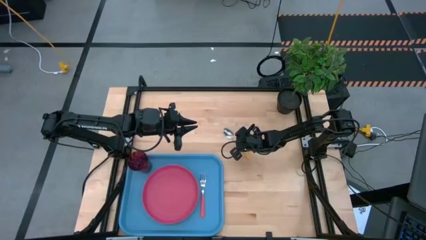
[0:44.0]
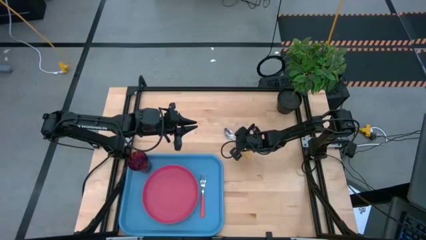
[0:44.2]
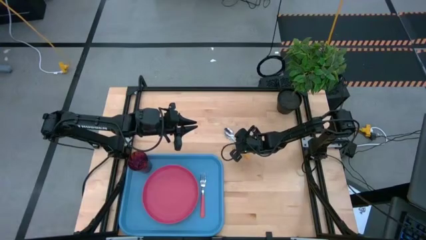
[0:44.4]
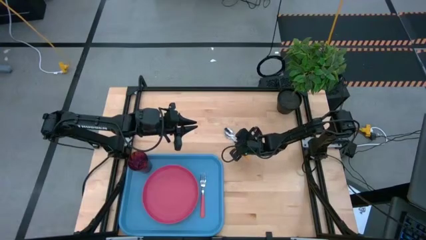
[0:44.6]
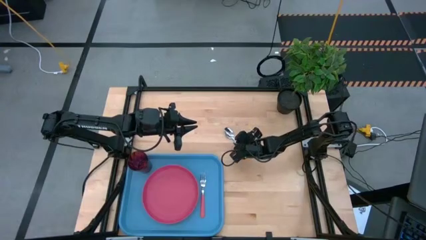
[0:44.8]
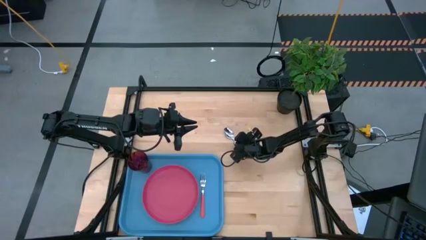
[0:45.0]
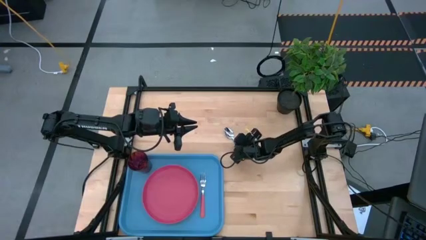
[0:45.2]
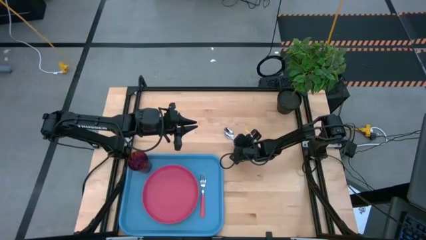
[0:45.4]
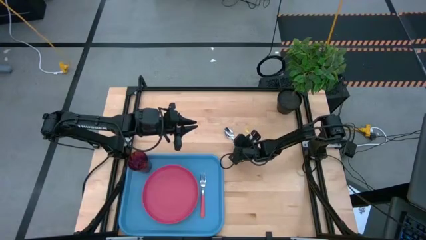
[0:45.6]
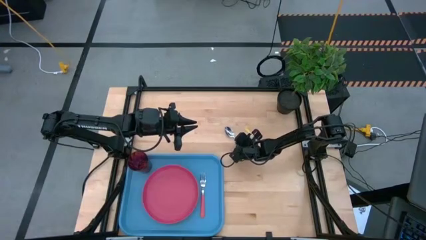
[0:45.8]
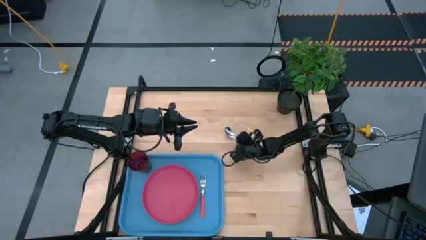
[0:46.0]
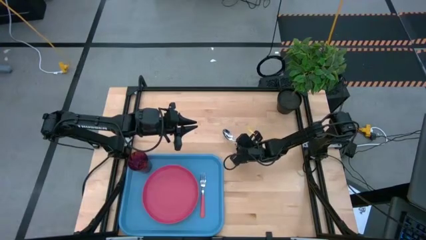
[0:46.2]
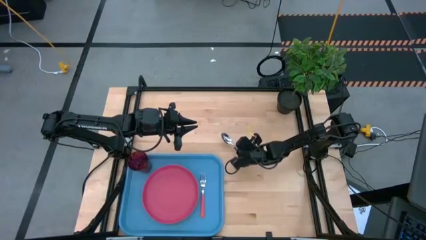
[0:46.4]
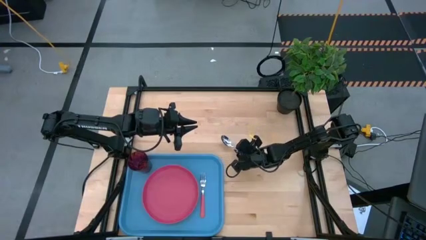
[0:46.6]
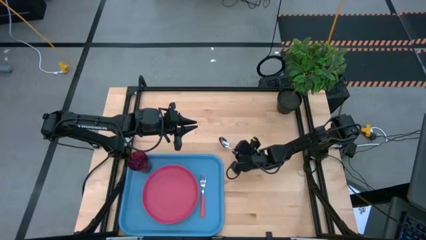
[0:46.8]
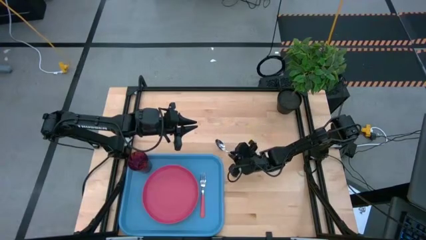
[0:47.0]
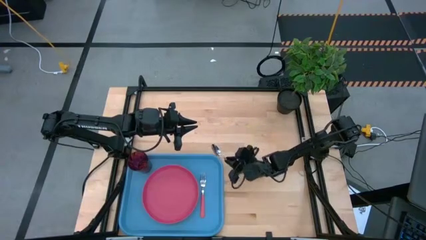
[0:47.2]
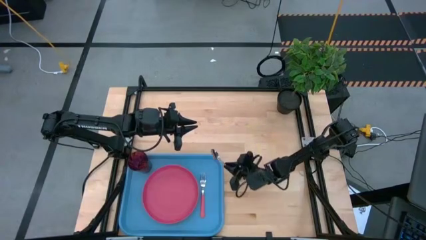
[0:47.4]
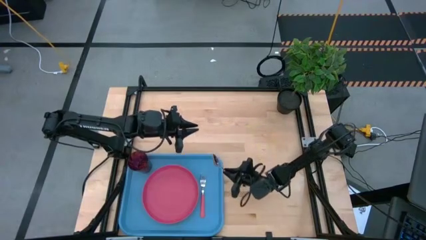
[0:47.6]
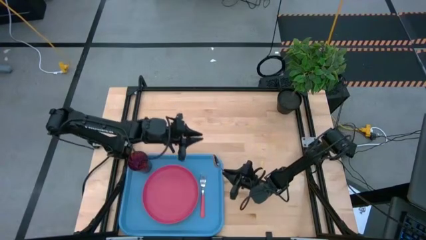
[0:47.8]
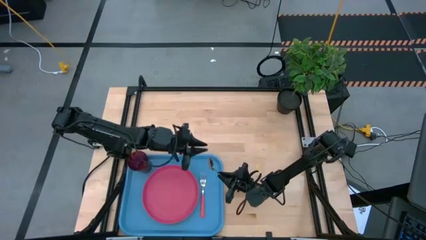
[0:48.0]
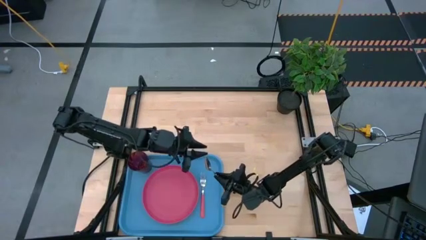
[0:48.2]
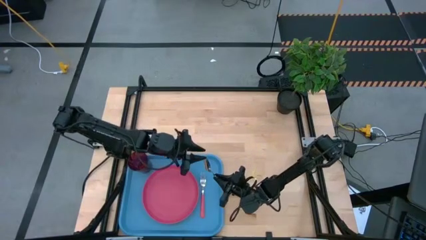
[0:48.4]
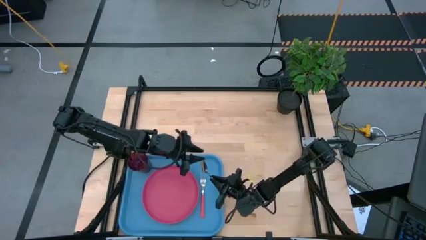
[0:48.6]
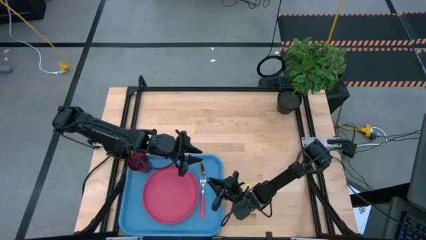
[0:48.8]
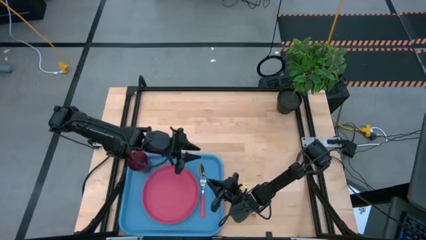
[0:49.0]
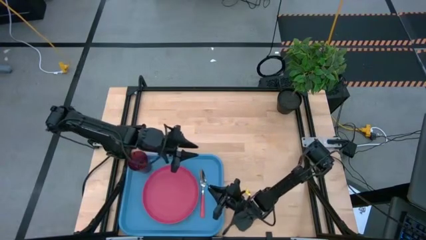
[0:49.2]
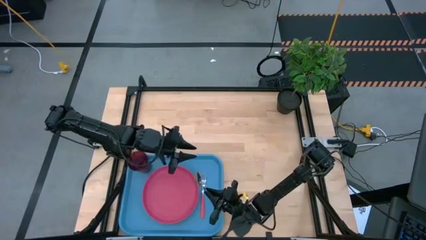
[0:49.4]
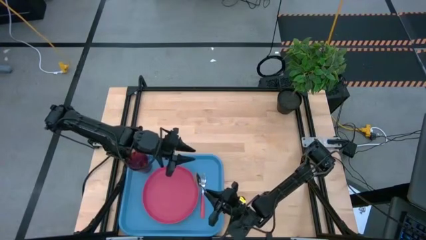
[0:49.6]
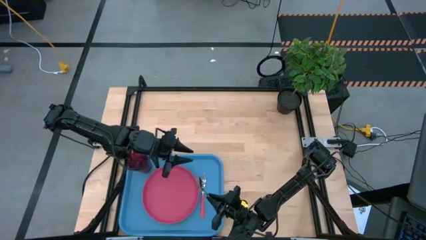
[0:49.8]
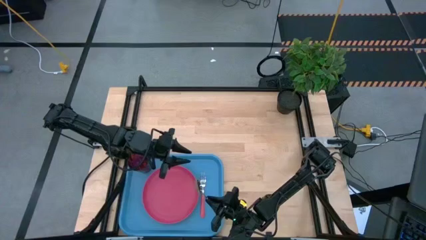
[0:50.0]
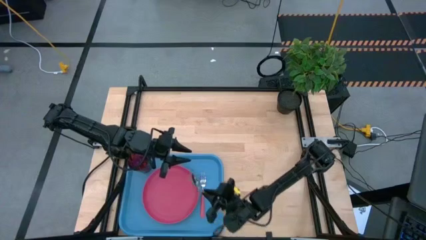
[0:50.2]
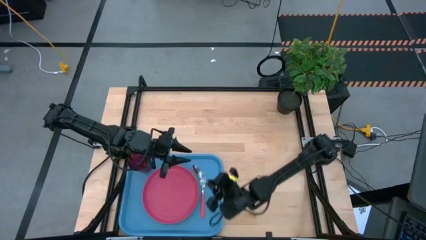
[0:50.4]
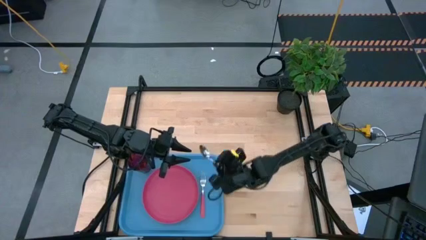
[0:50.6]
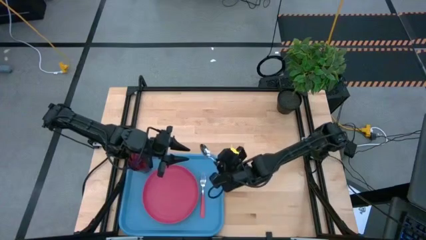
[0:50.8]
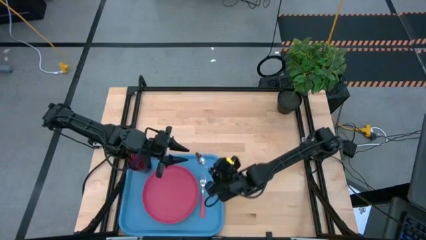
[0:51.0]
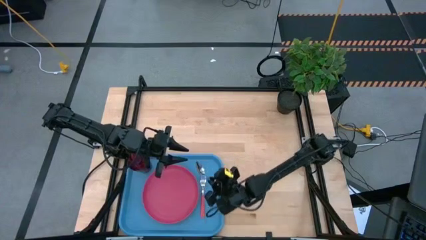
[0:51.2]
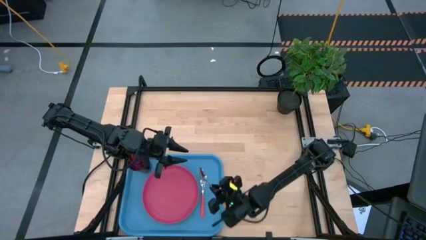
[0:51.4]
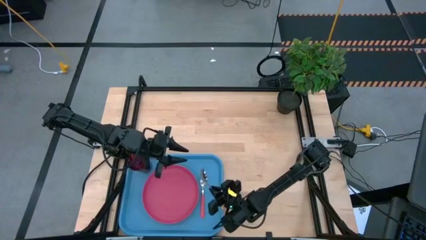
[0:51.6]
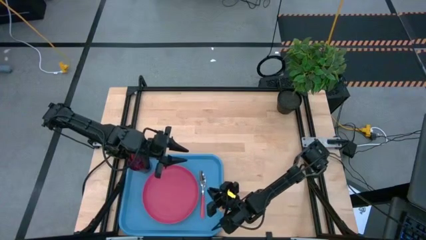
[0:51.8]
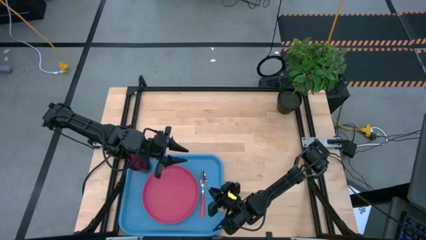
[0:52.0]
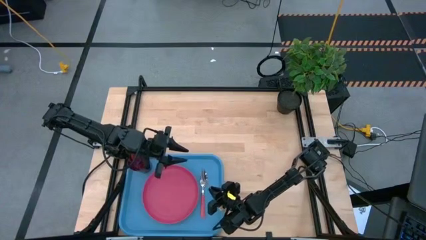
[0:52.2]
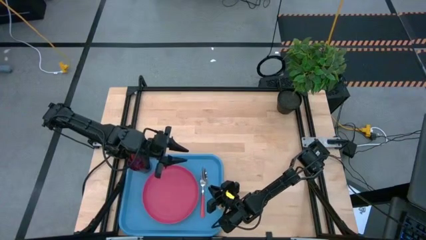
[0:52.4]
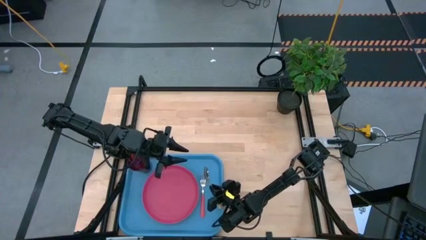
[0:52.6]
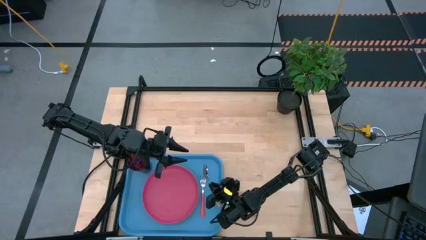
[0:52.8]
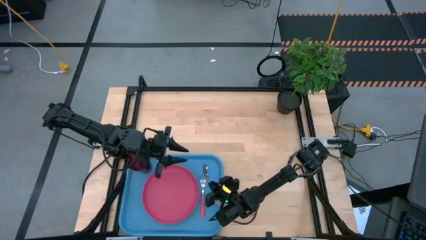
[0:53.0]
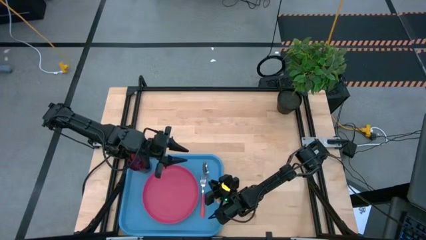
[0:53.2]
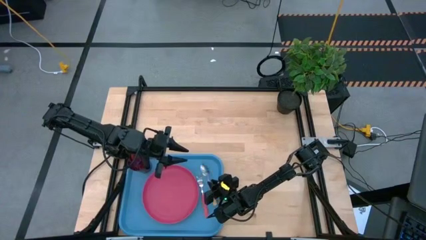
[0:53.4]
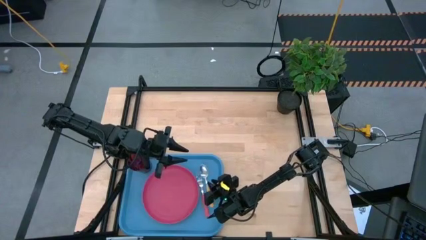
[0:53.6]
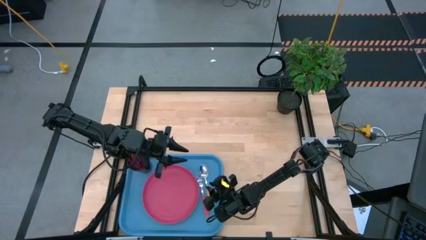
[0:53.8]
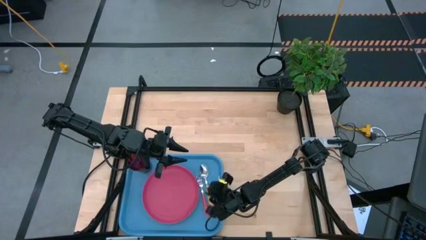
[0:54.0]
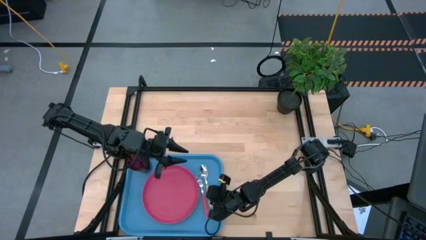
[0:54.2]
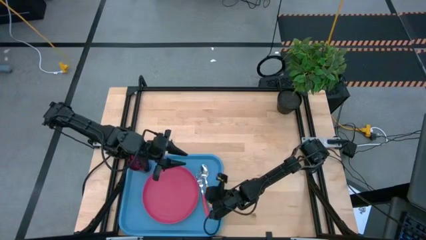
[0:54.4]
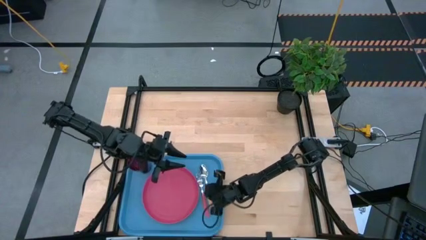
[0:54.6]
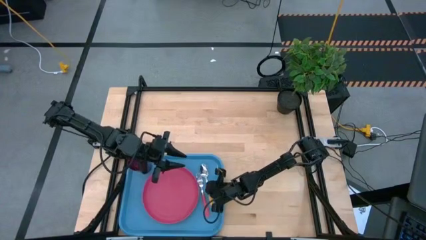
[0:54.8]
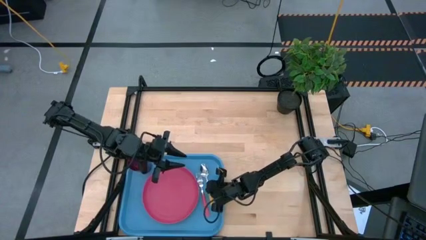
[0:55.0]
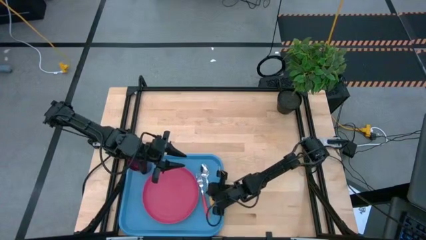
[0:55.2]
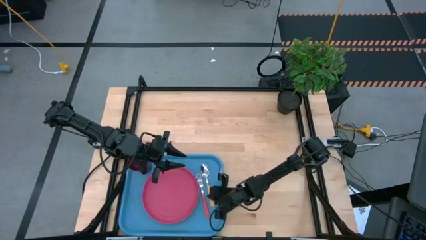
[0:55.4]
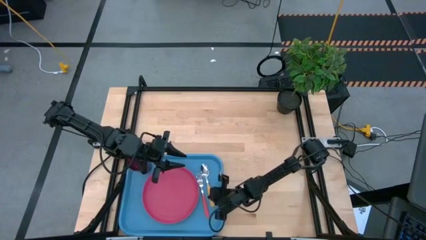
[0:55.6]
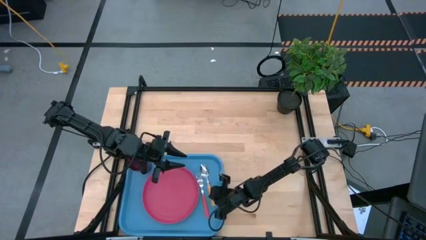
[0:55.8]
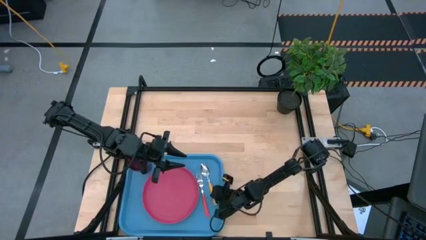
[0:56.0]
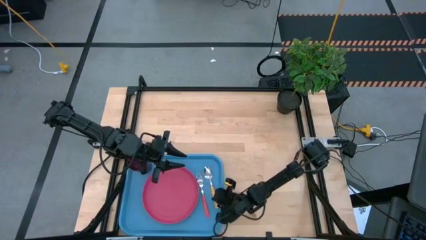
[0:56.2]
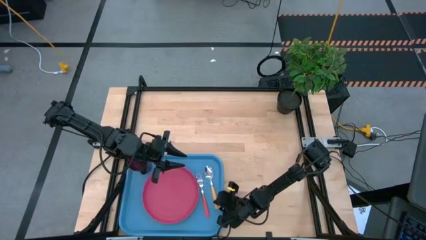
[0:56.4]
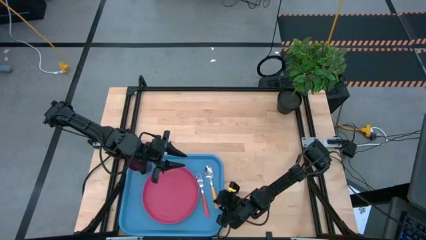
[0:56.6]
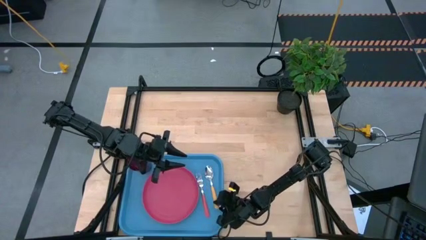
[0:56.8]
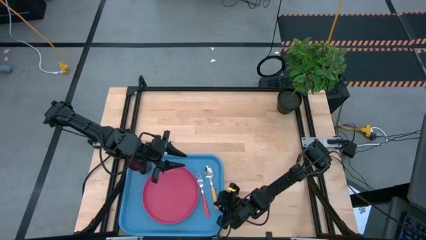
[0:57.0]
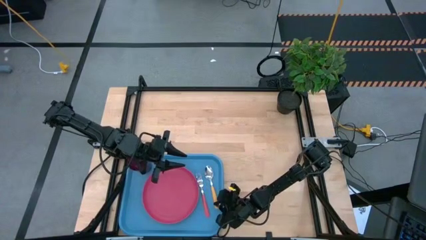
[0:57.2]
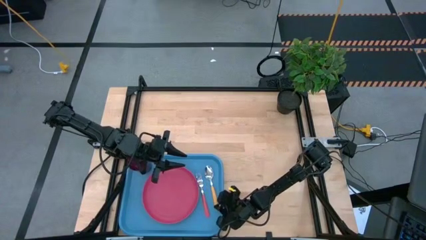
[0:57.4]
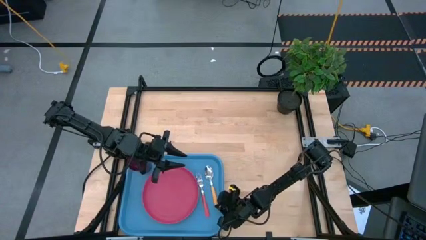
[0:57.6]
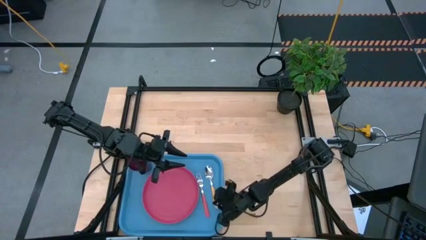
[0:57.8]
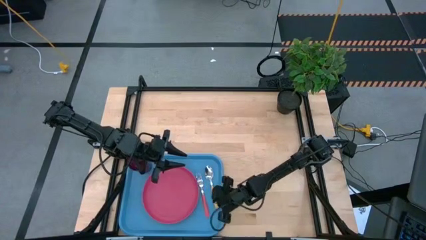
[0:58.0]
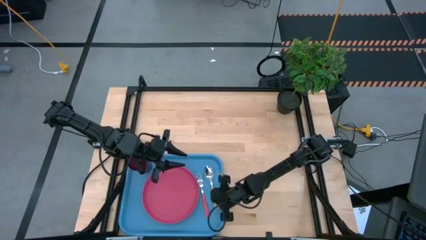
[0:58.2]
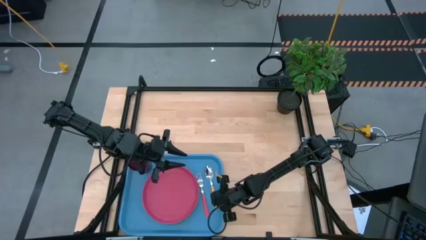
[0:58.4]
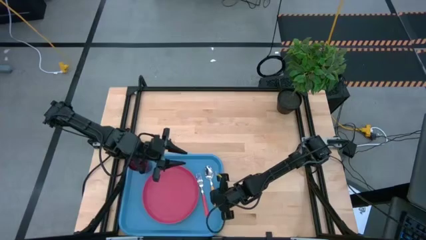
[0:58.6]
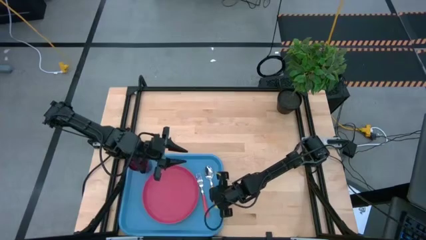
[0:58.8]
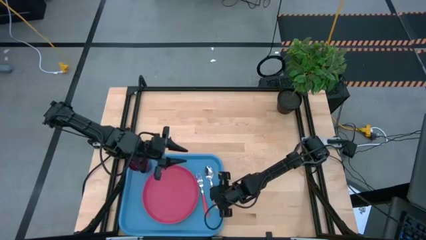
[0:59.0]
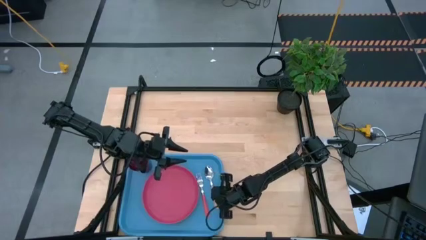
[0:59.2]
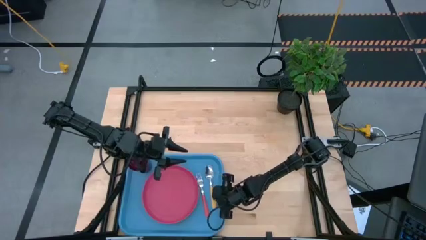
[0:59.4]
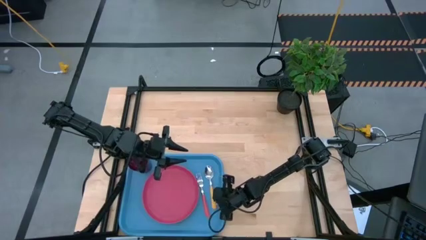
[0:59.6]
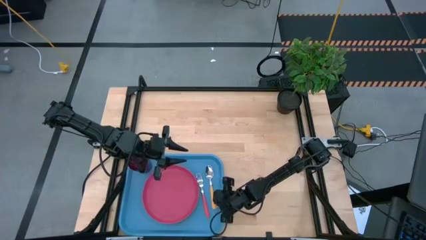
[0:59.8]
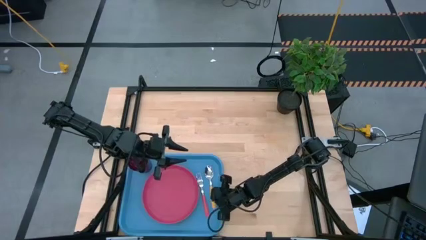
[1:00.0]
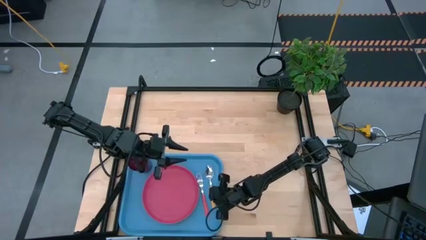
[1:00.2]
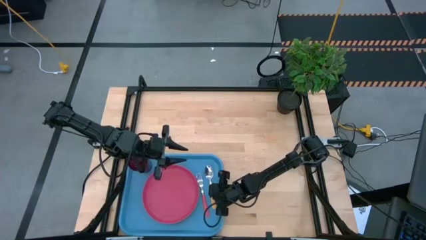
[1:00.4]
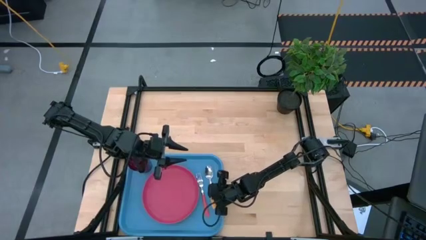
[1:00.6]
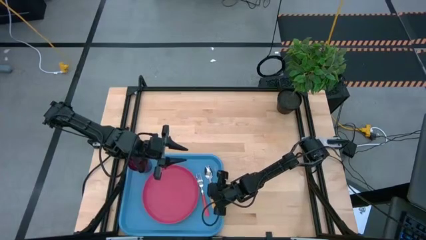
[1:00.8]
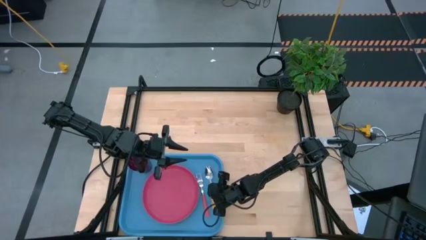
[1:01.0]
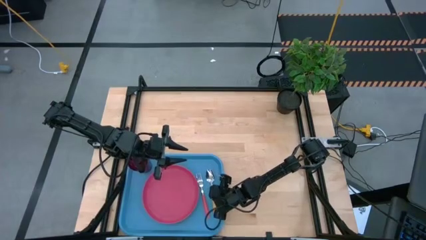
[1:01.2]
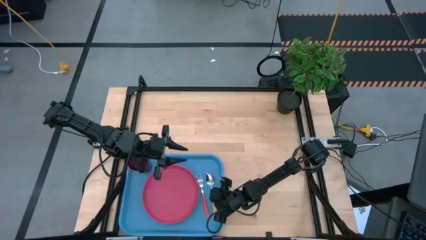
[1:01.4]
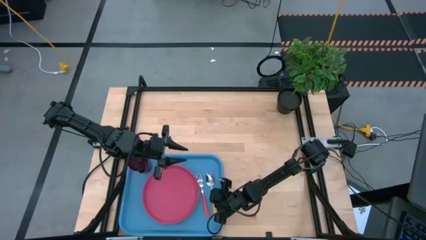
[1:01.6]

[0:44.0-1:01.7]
Task: Pick and place plate/cup/fork/spoon on tray
Put the yellow spoon on the blue serving tray to the right of the pink fork
